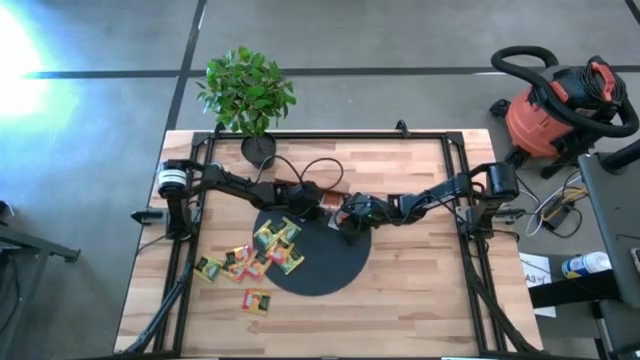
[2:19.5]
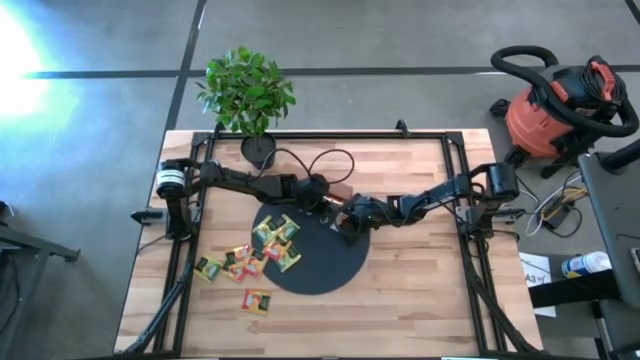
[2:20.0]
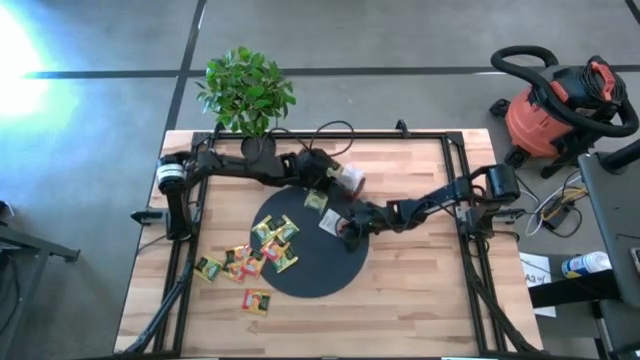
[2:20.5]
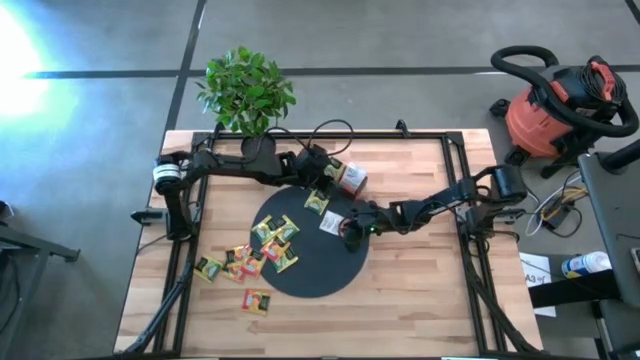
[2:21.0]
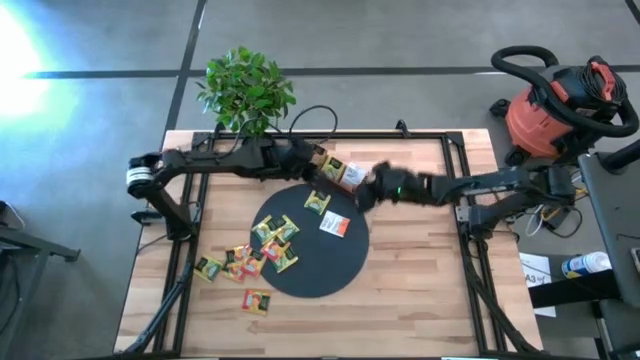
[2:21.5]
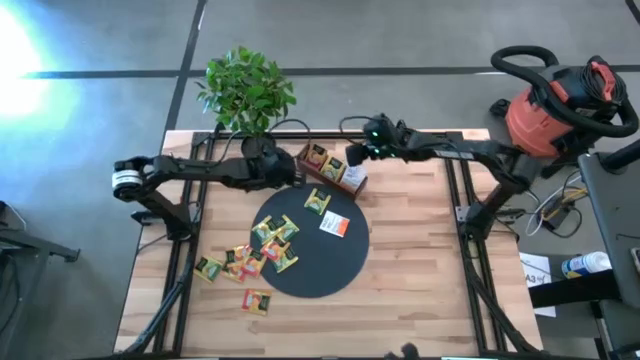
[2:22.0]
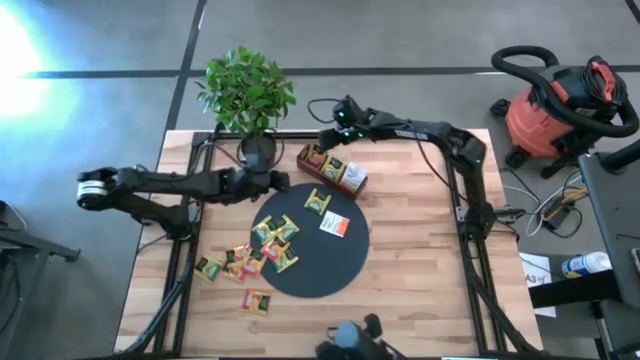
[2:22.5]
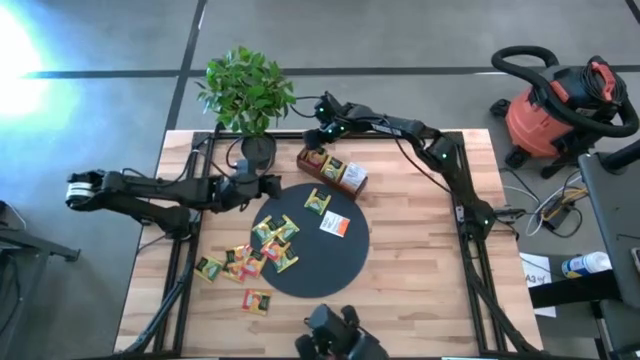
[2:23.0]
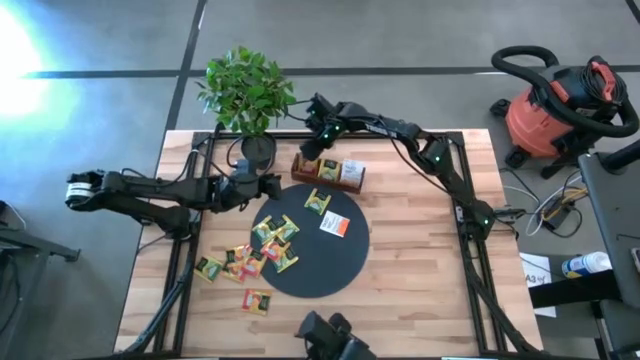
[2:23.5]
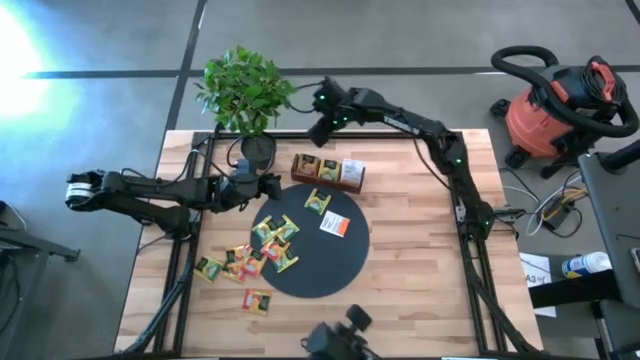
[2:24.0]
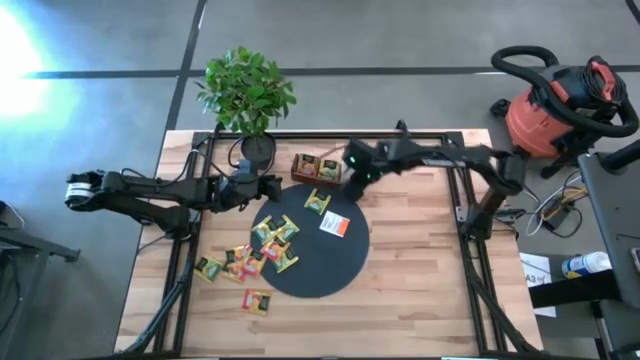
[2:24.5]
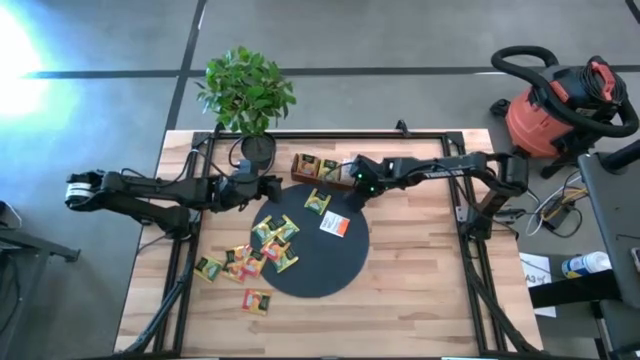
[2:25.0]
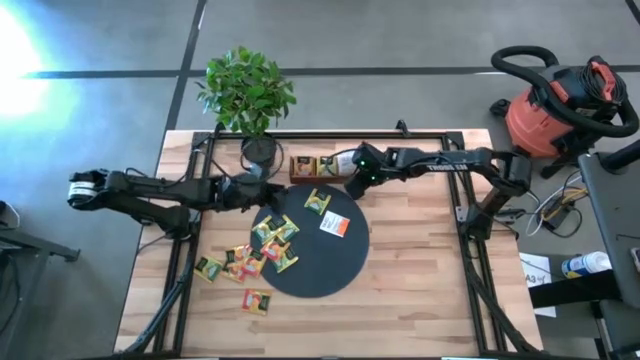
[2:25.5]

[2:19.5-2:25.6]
Task: Pick & Place Tea
Adjust the wooden organizer on the table

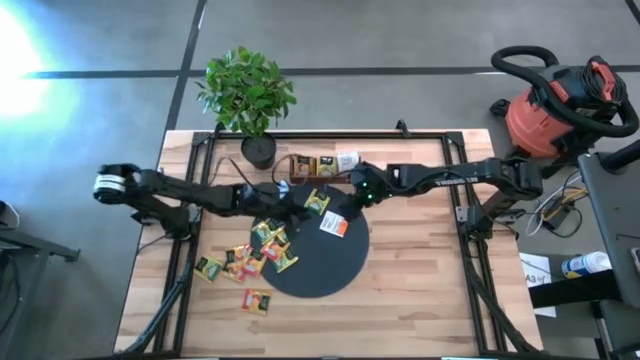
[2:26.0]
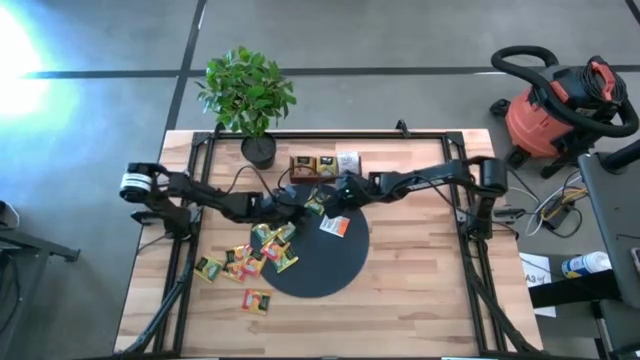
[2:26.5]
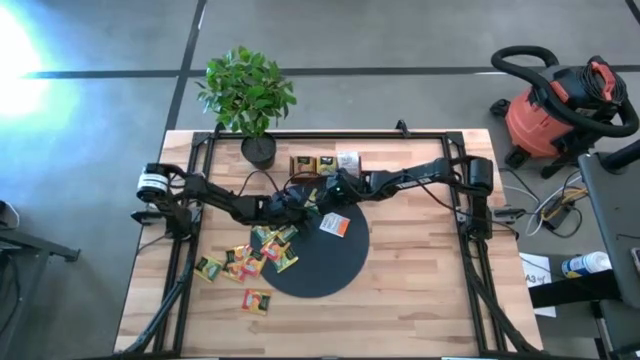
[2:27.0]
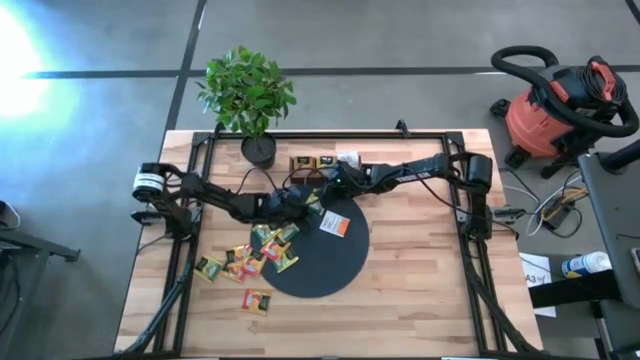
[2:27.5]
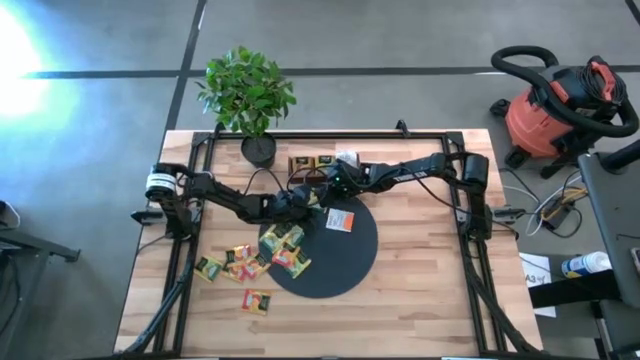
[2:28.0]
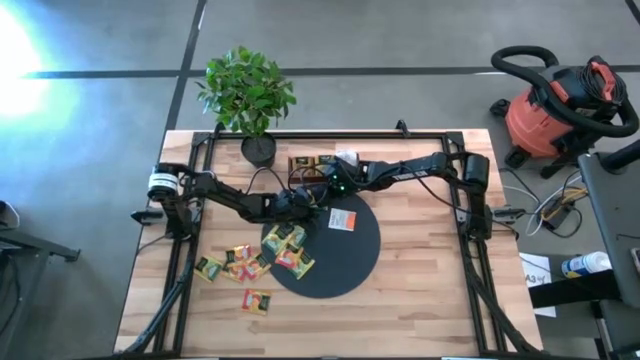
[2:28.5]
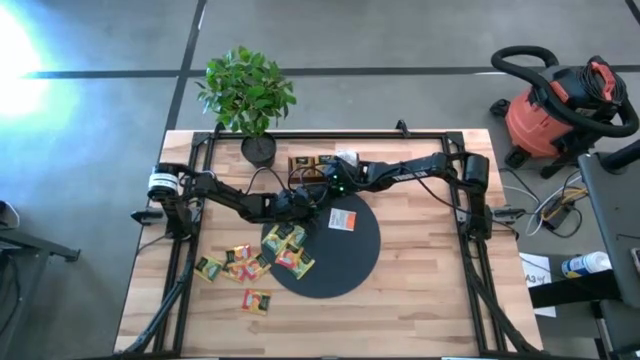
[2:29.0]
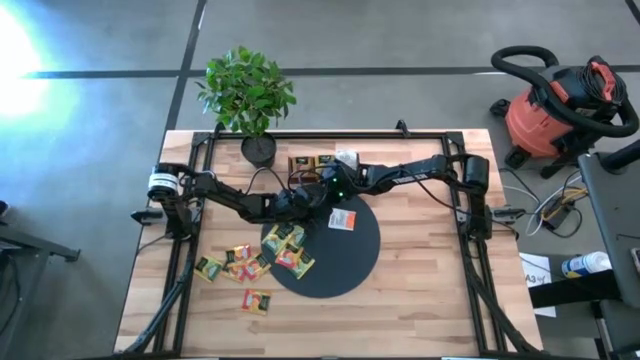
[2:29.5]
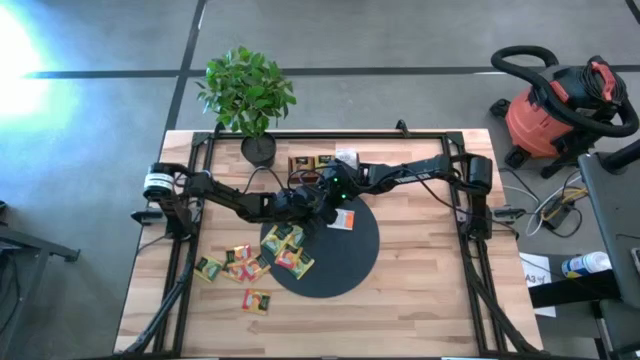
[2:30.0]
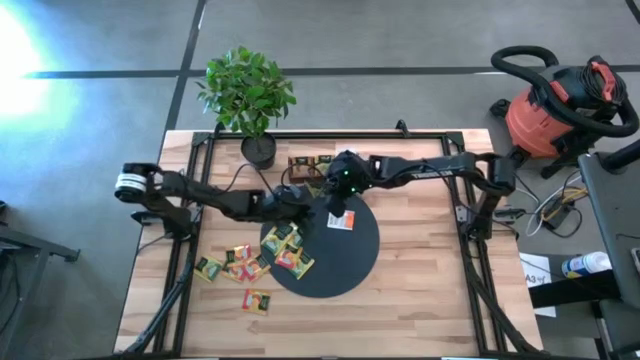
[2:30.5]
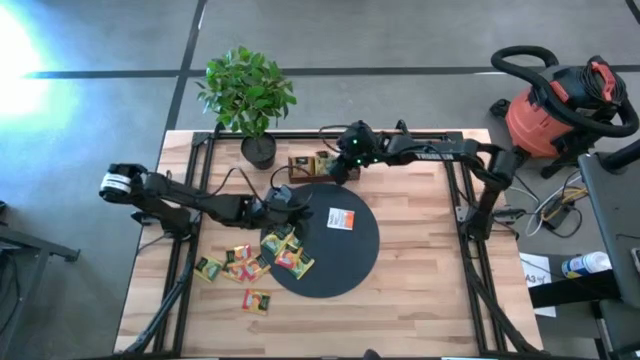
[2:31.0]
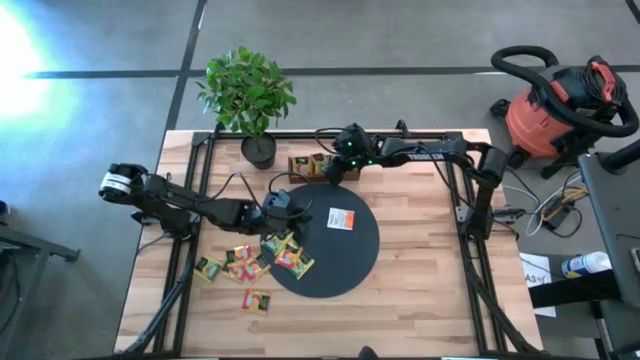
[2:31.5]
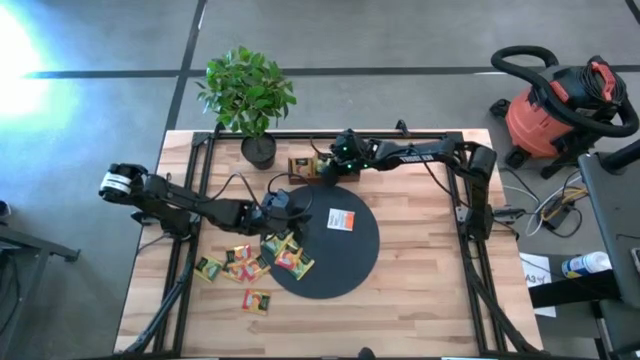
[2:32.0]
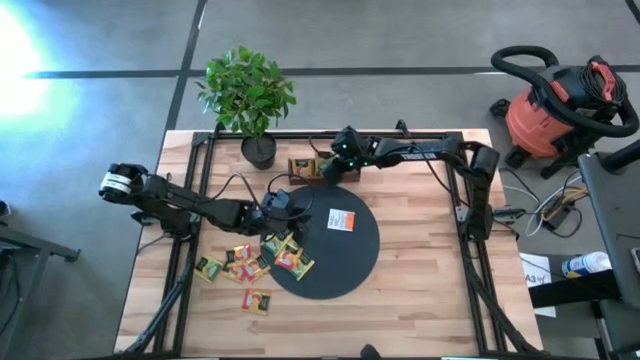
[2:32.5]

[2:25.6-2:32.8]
Put the yellow tea bag into the middle slot of the wooden organizer
